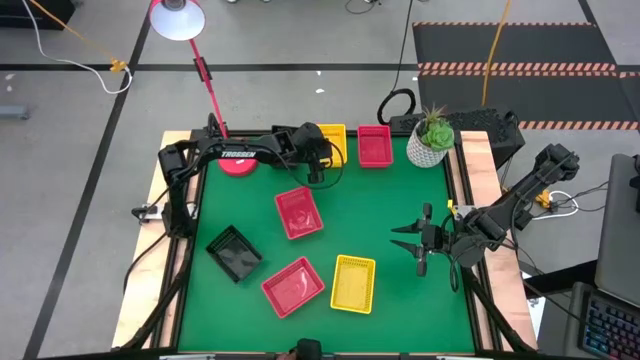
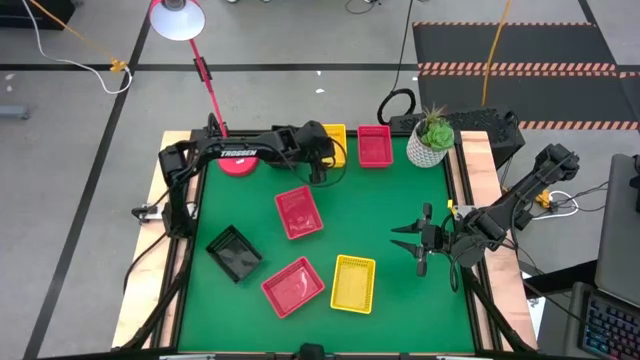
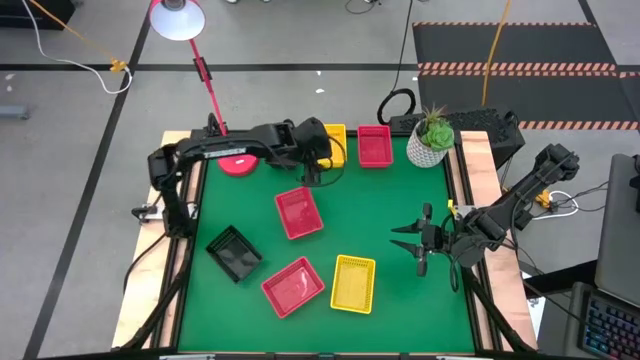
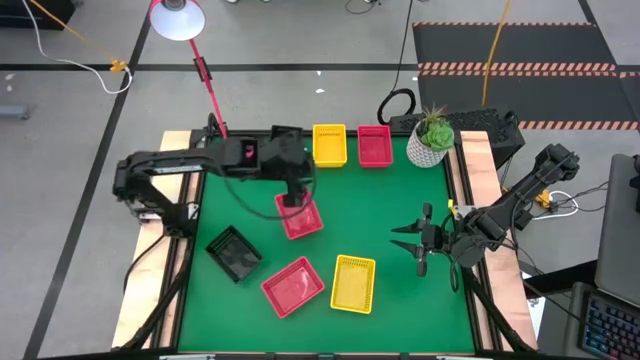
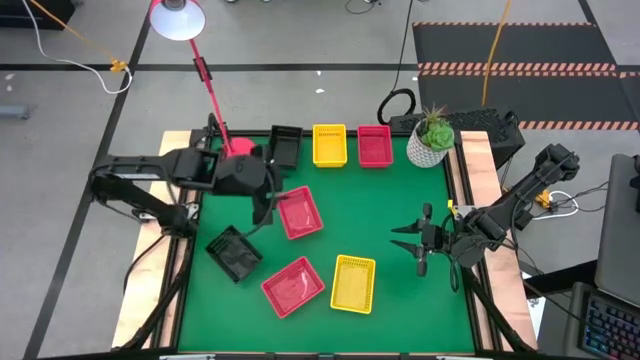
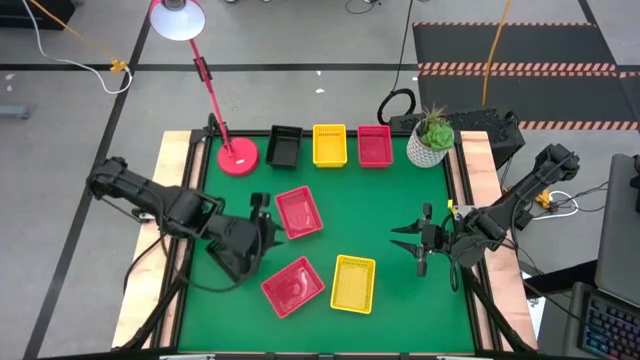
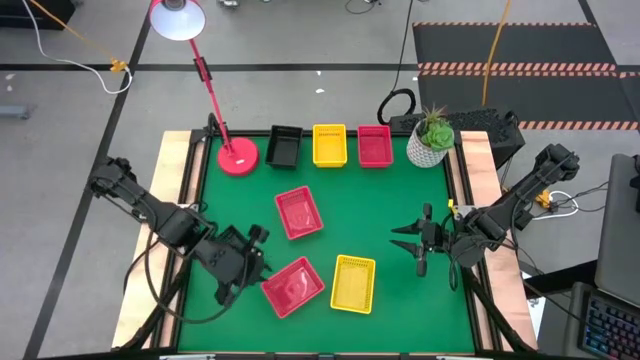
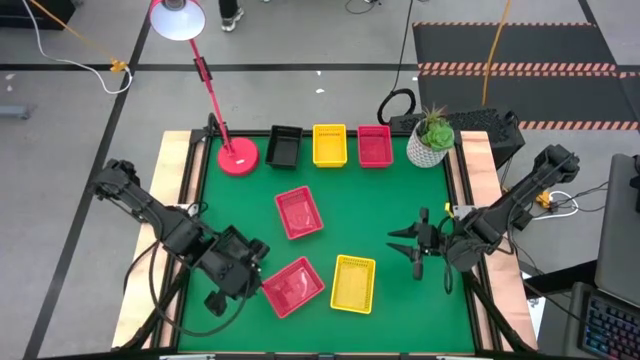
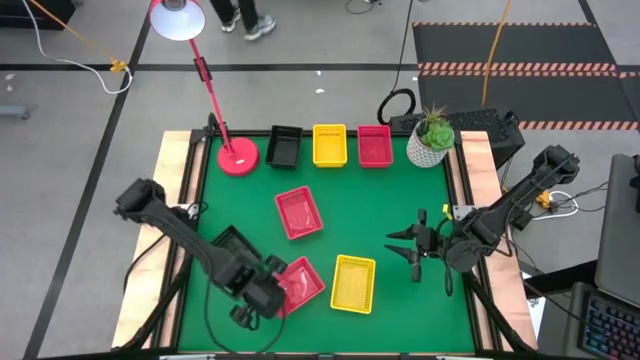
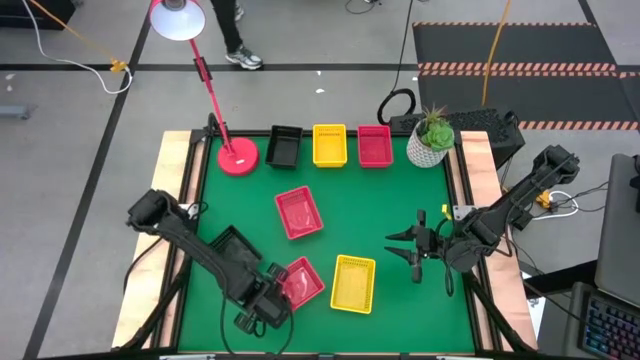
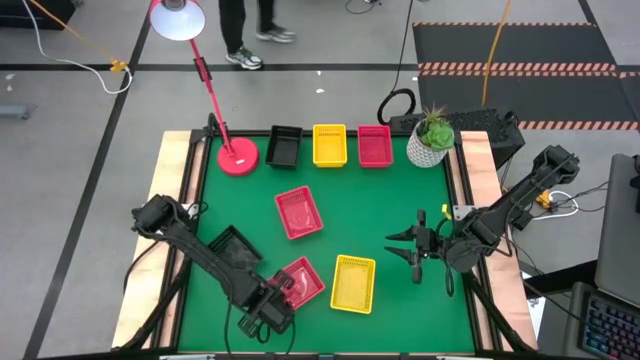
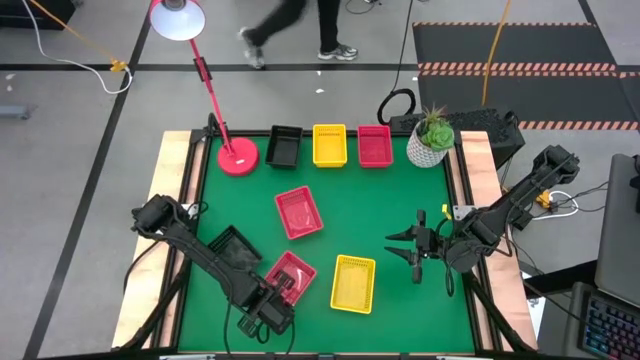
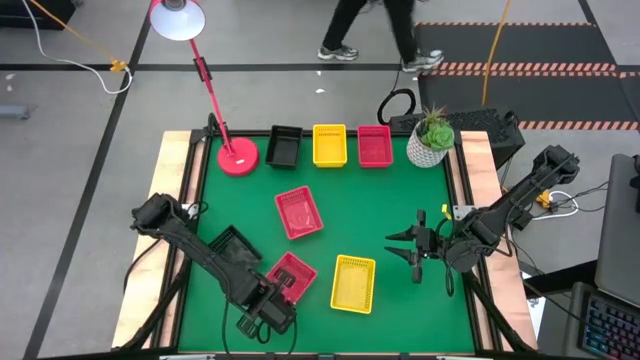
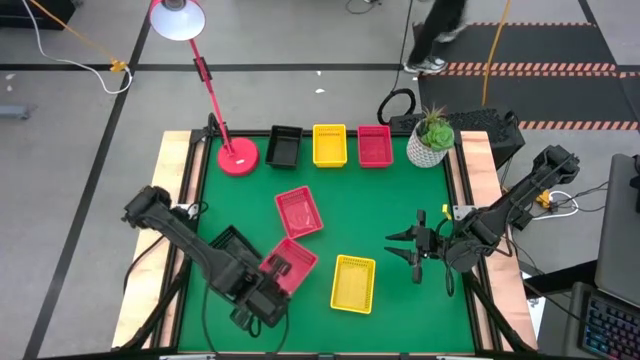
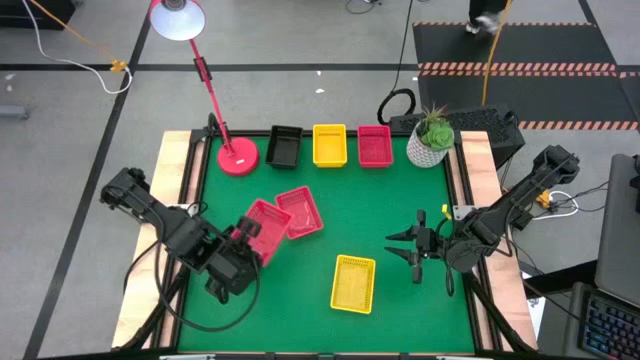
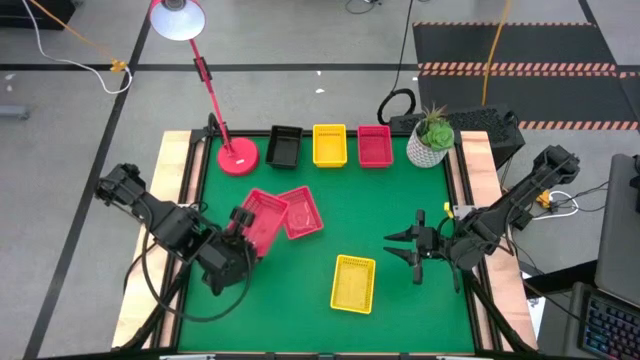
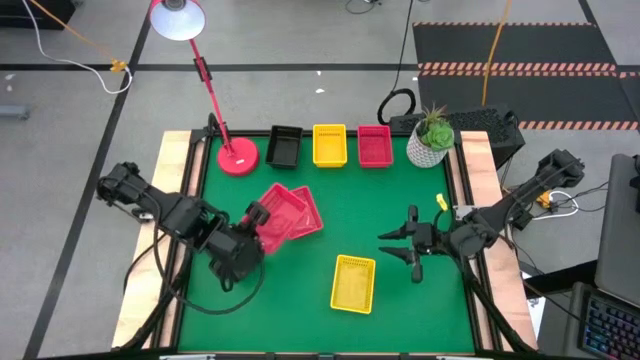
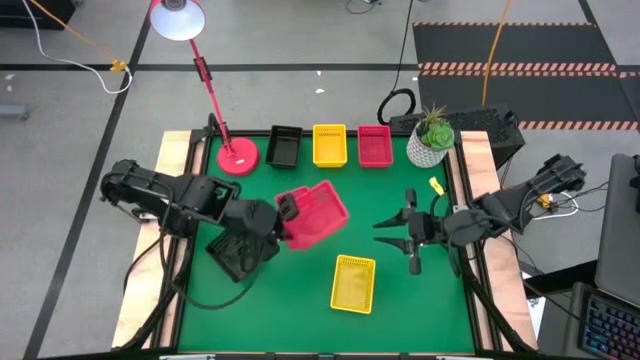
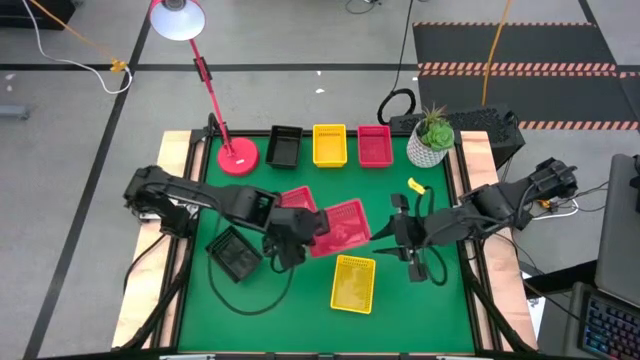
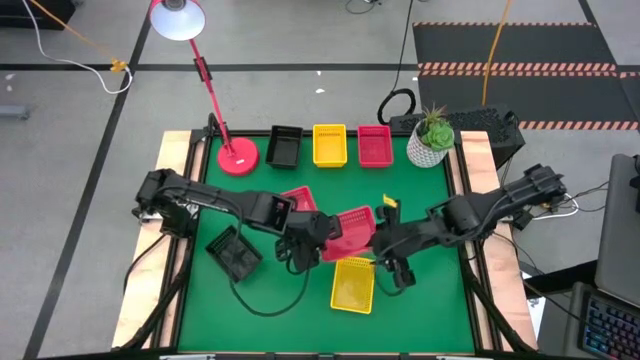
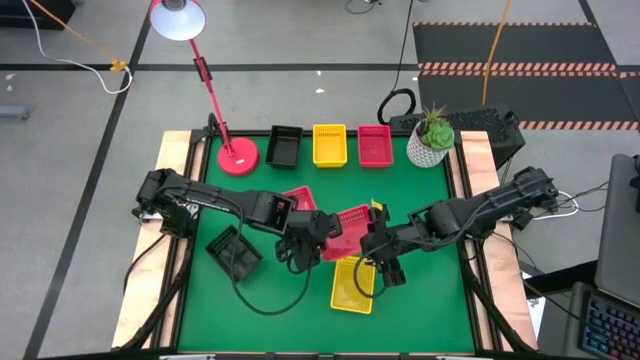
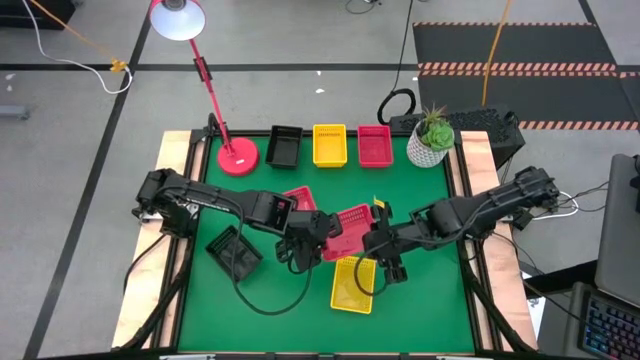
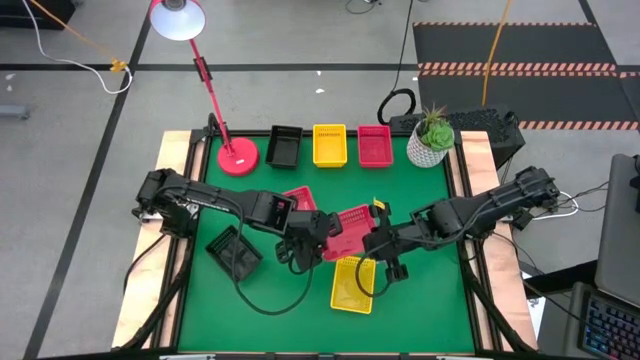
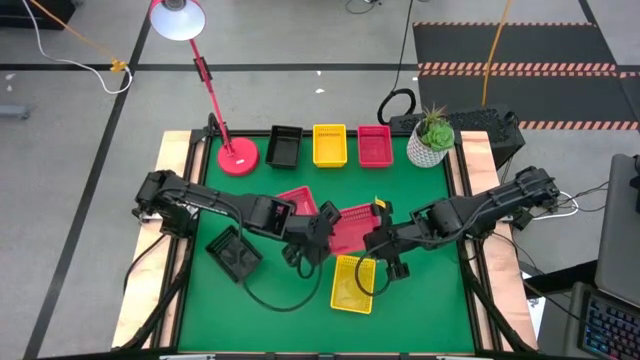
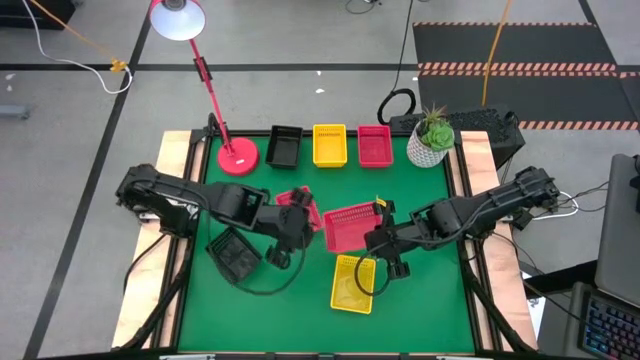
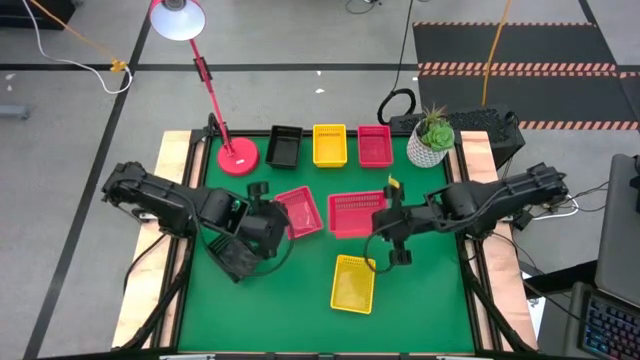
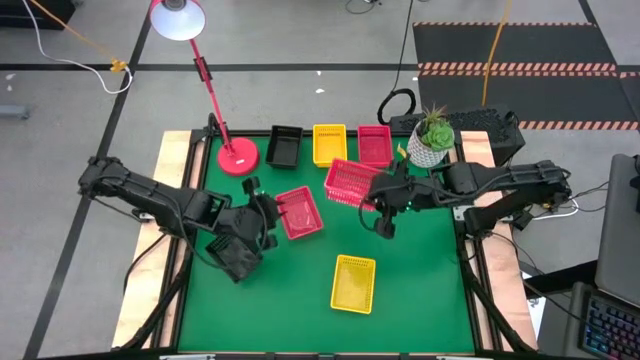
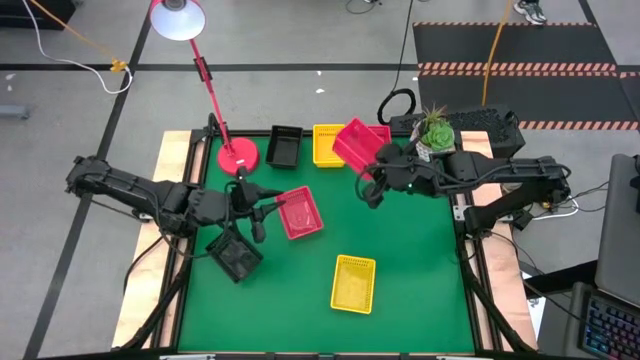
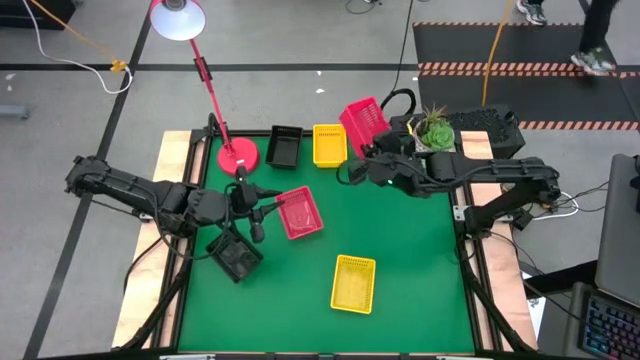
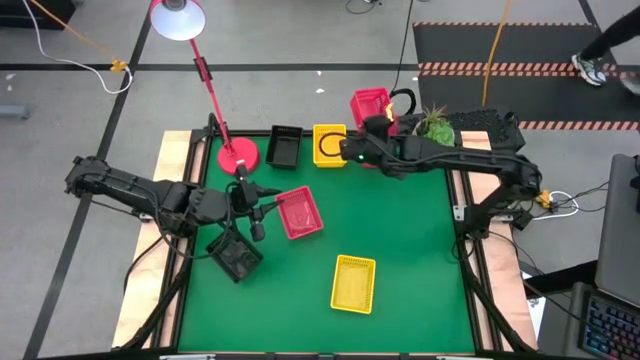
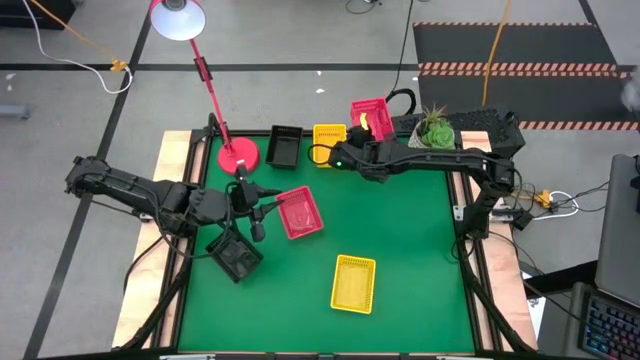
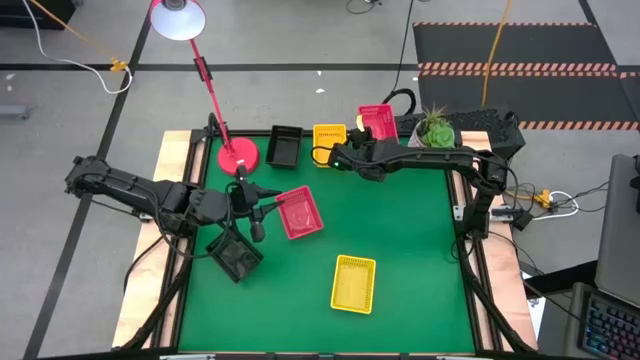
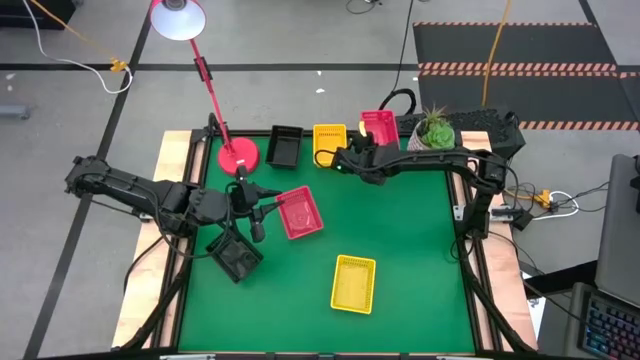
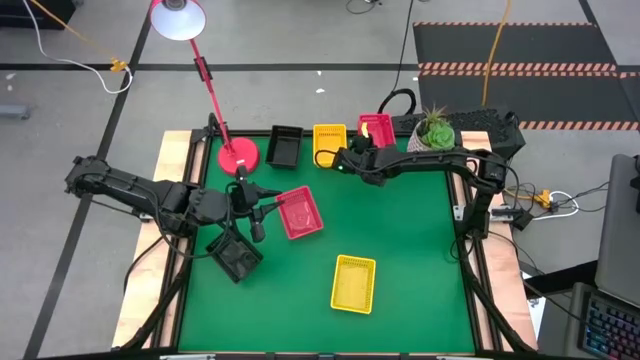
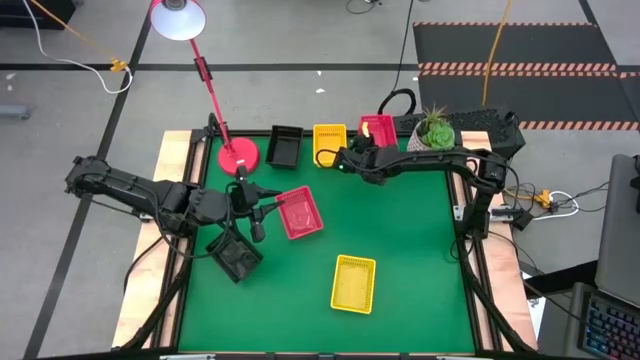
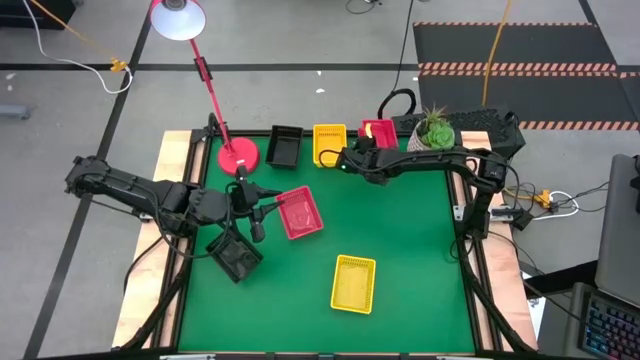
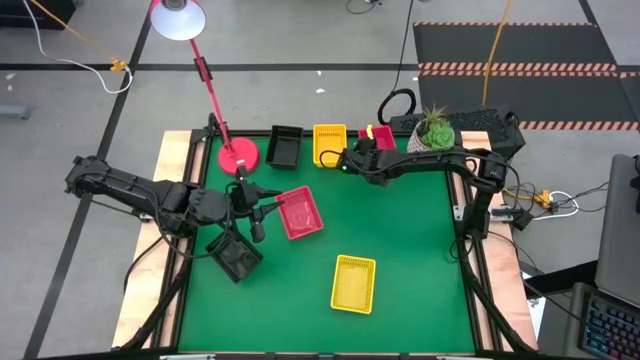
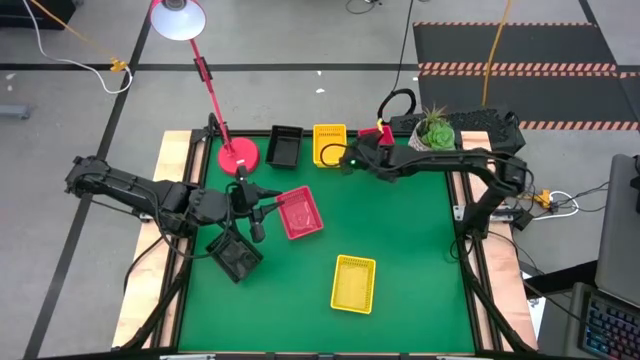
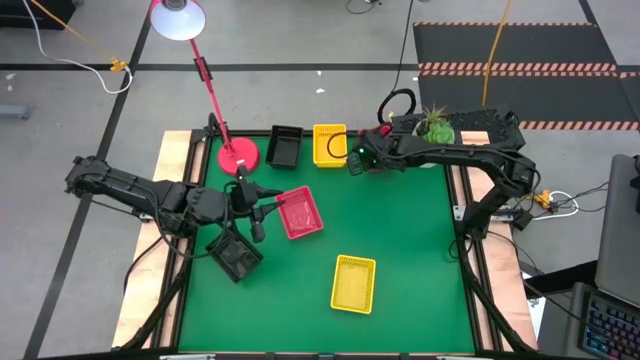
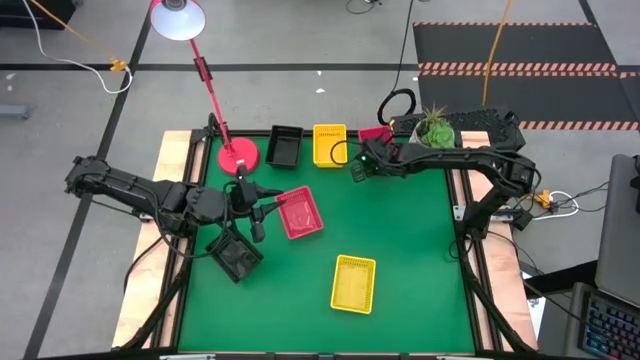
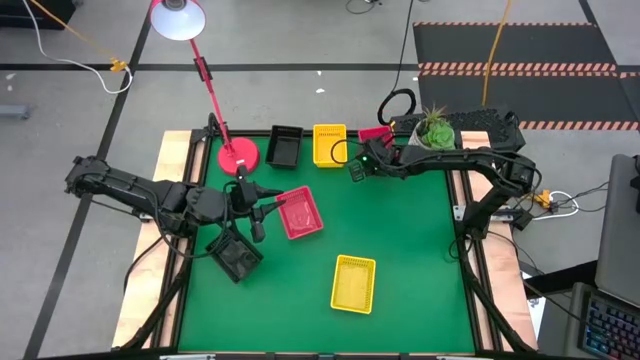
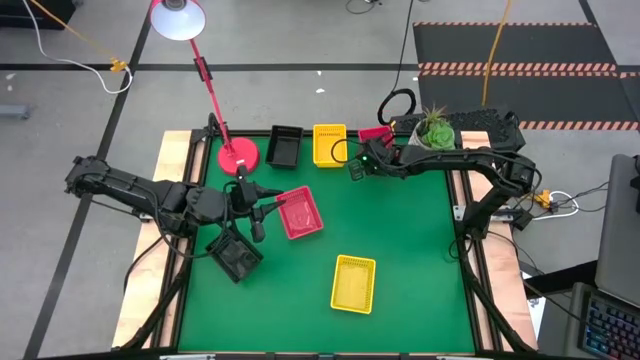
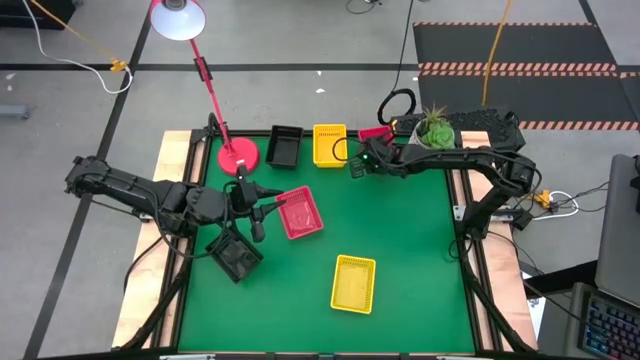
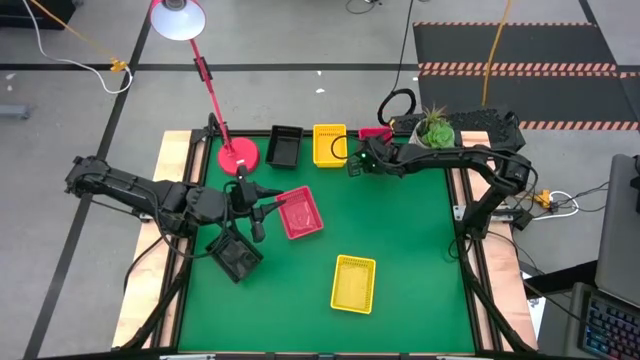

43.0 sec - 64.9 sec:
Stack the bottom red bin on the top red bin
